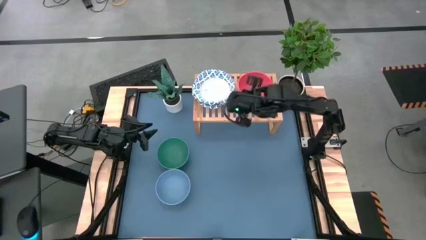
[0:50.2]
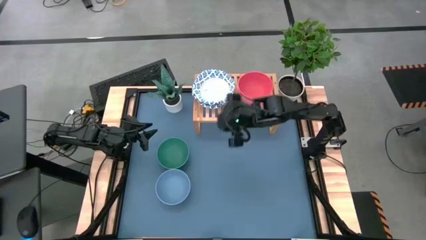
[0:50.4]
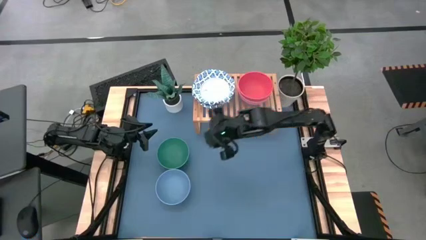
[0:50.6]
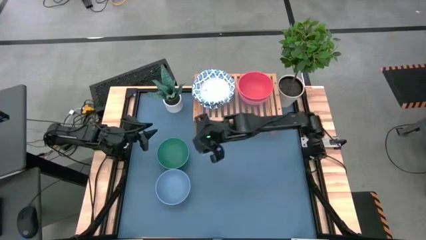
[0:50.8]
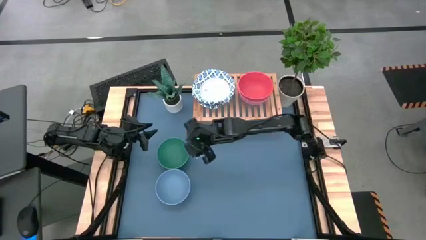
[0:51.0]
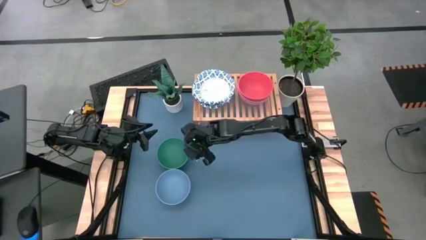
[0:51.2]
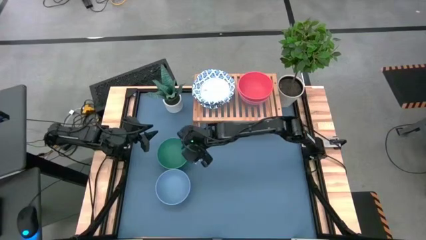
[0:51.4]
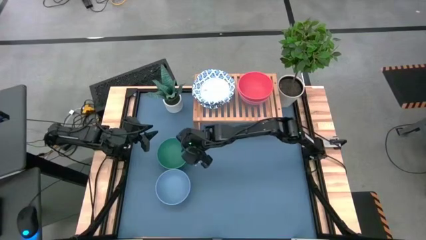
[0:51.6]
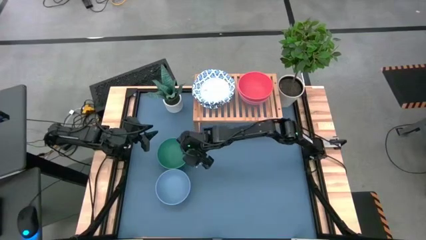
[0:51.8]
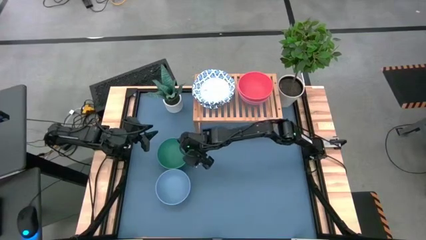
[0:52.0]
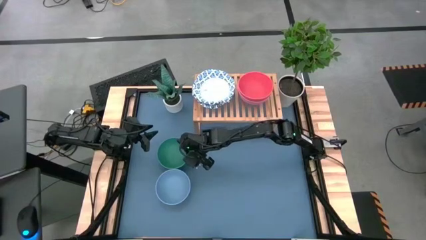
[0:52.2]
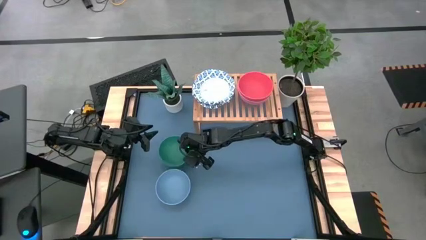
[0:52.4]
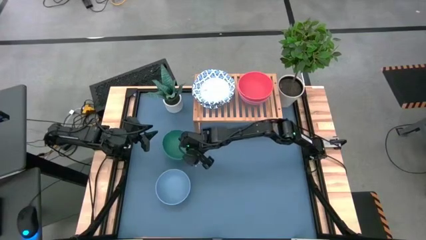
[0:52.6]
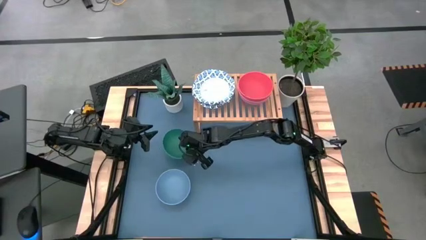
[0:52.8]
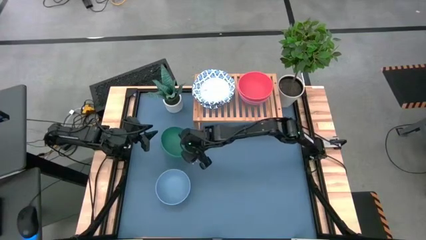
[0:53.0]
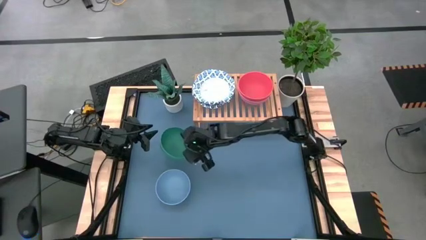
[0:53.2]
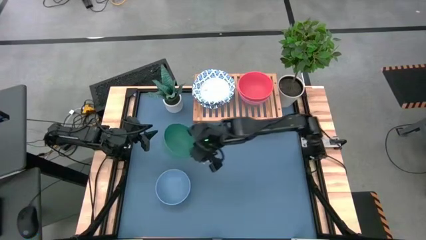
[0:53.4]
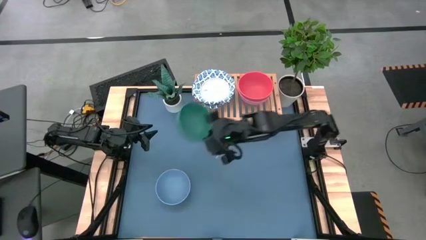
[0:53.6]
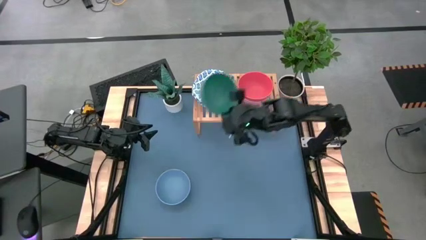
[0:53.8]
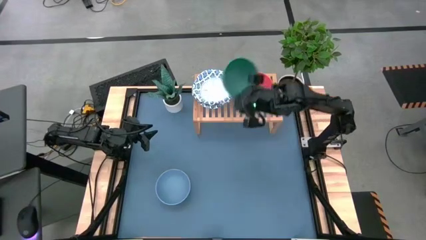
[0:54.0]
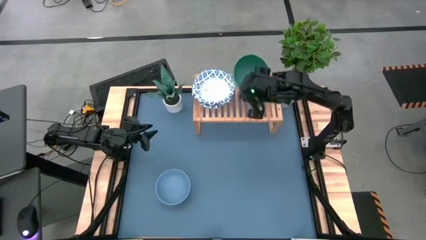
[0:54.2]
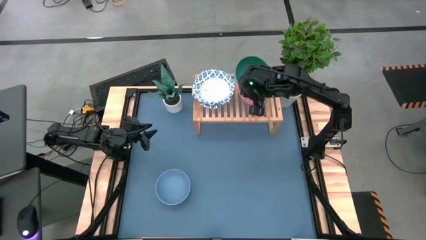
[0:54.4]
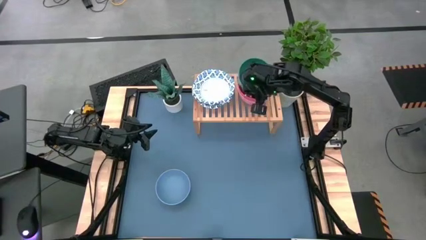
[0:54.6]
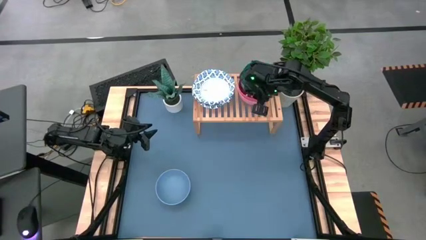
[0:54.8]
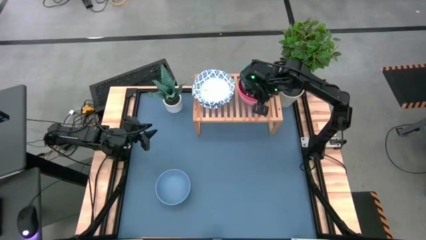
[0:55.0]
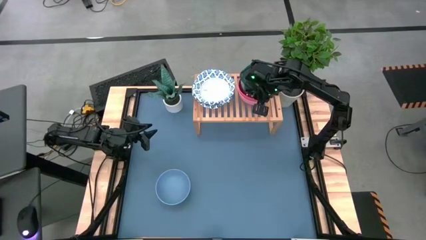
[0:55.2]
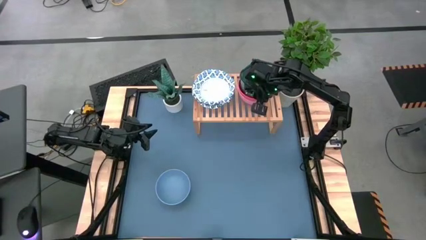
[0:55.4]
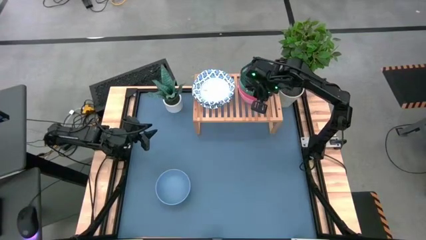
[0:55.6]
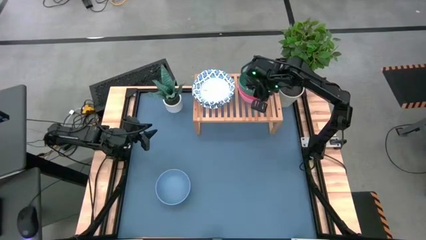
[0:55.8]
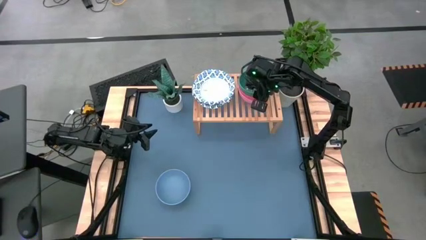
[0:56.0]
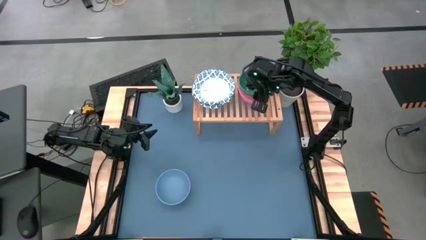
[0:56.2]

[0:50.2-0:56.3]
Task: Place and stack bowls onto a shelf
Stack the green bowl on top of the orange bowl on the shelf

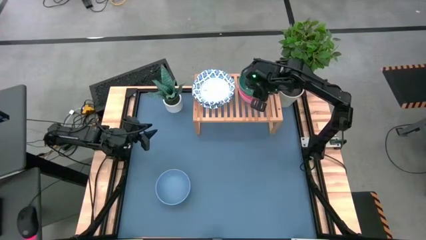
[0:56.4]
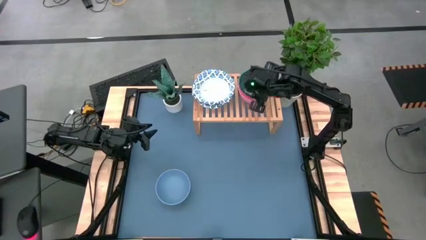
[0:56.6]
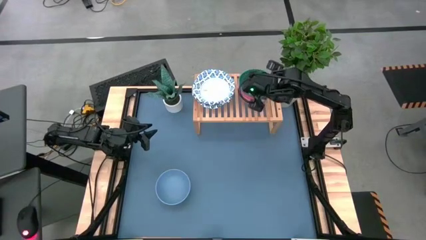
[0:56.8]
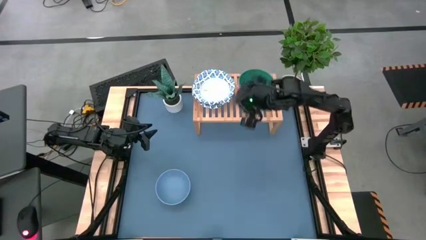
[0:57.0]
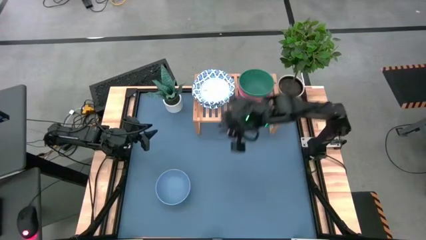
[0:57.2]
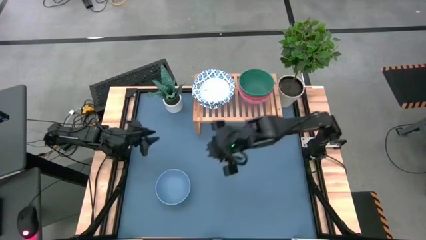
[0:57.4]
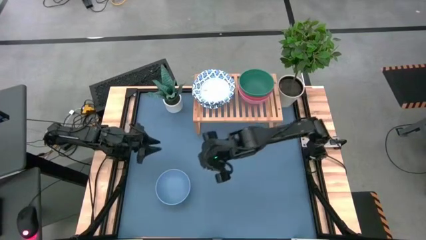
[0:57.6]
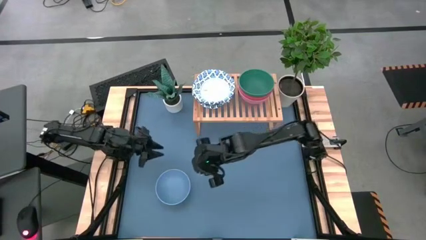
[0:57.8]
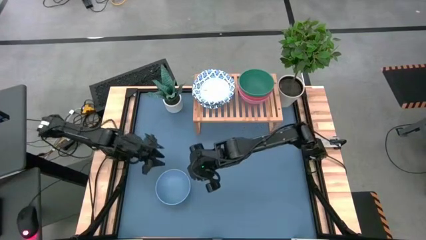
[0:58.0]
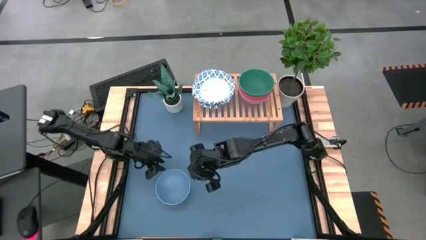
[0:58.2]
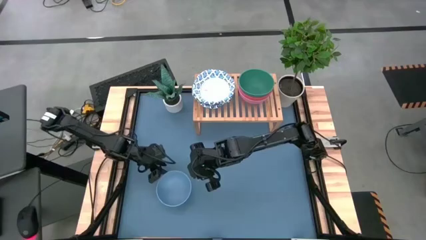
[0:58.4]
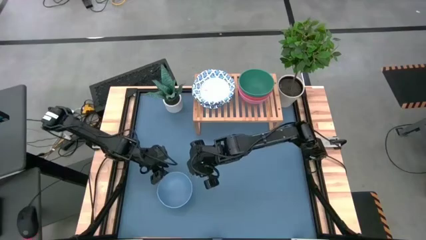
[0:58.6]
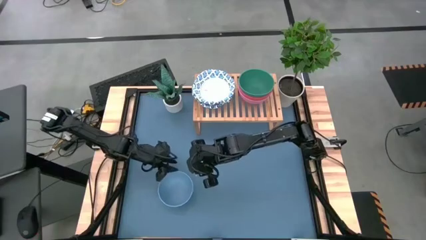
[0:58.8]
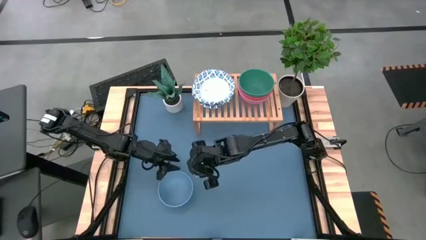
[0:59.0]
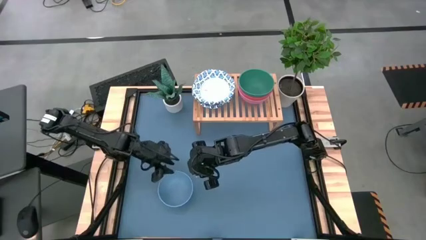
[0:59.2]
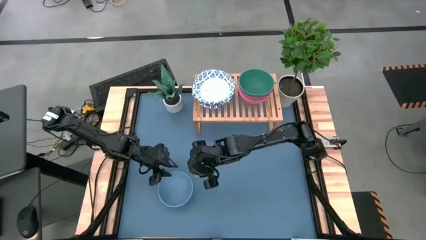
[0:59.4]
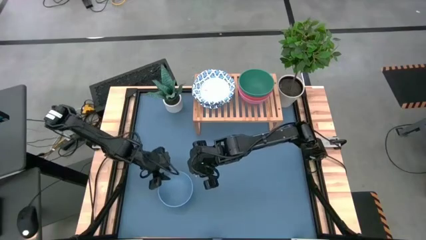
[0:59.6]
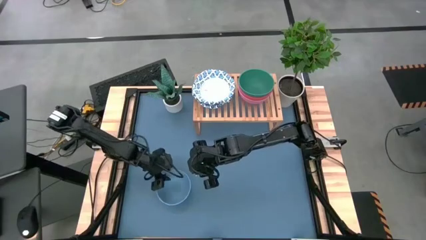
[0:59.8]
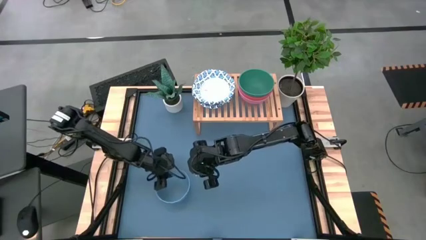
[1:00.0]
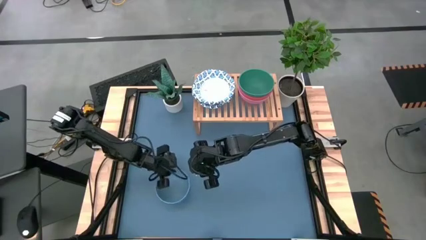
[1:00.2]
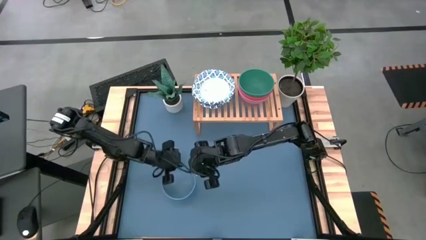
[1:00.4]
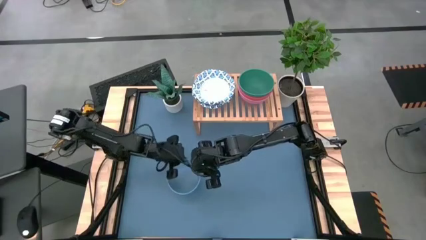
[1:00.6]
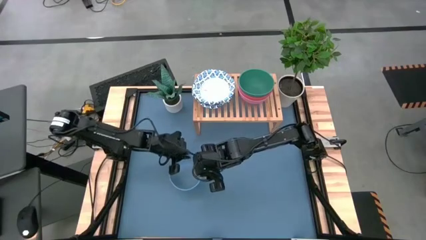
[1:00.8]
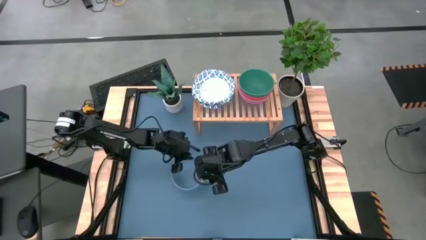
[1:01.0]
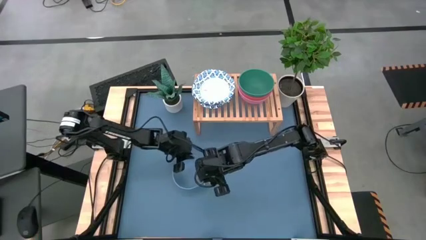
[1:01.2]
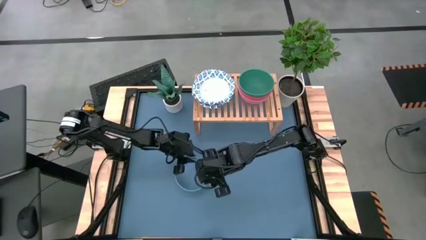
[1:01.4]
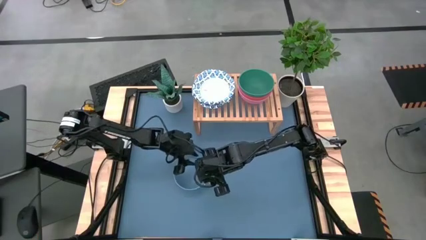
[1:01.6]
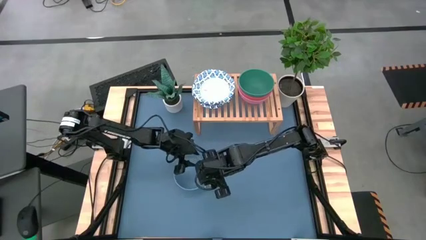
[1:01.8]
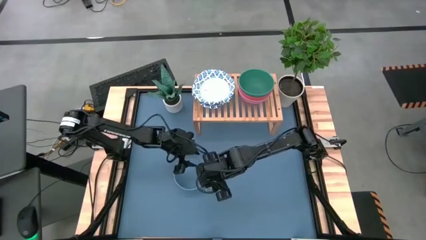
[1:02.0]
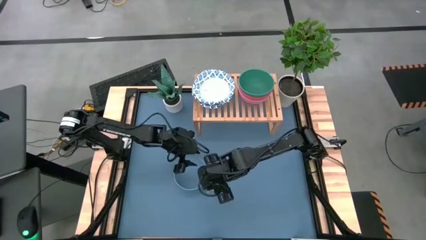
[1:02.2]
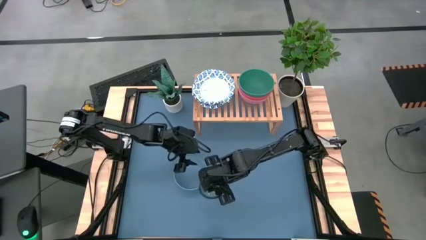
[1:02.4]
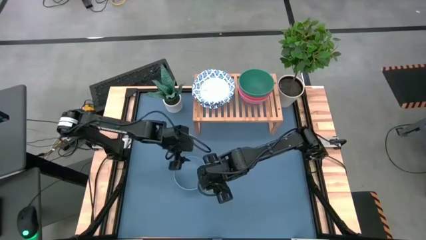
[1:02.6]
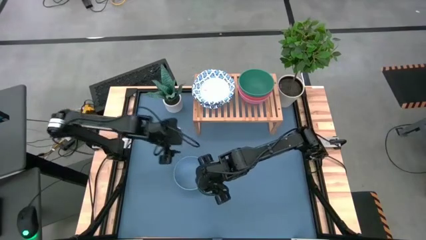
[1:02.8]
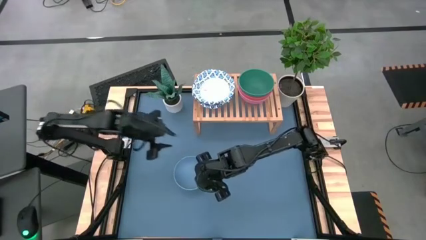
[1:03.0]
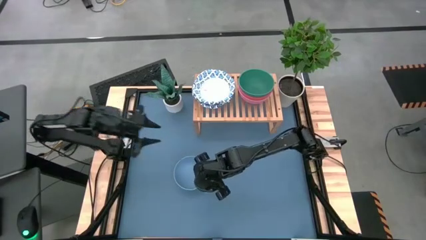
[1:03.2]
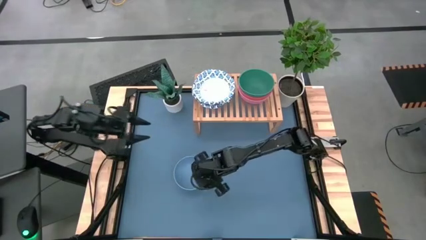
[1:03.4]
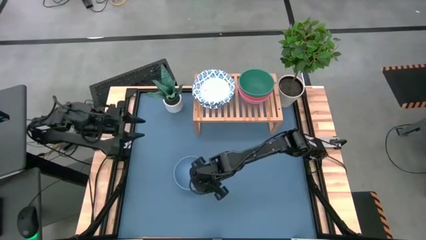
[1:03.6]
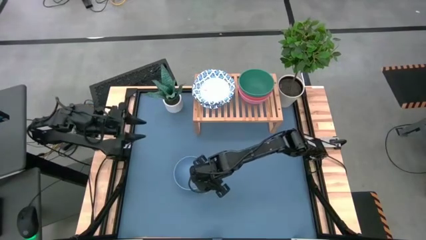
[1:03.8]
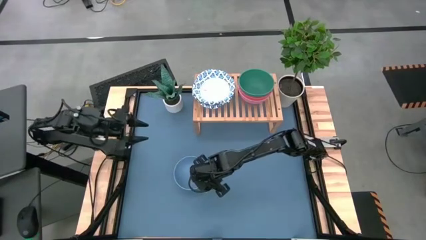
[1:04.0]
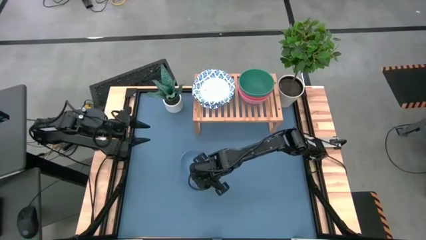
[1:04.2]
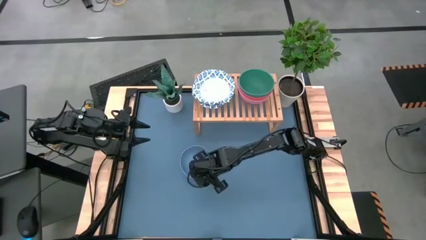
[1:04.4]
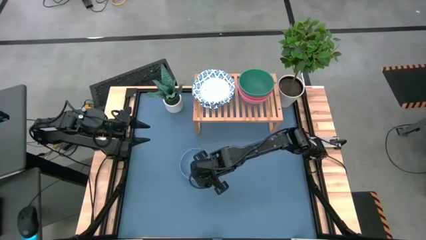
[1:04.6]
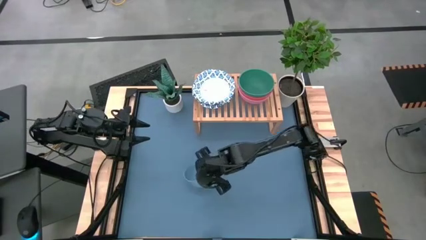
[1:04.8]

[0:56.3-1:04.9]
Stack the blue bowl on top of the green bowl on the shelf
